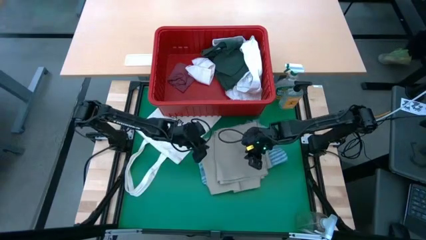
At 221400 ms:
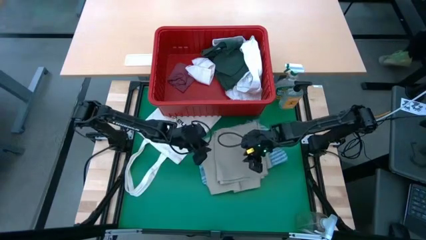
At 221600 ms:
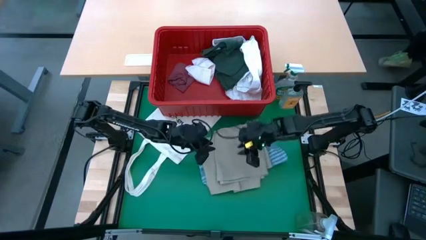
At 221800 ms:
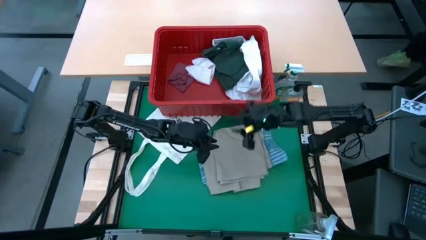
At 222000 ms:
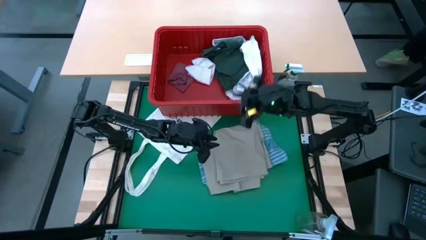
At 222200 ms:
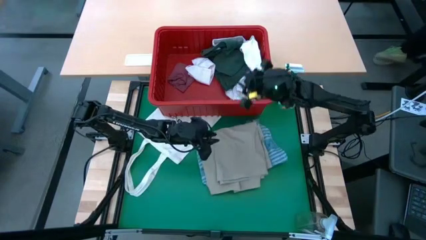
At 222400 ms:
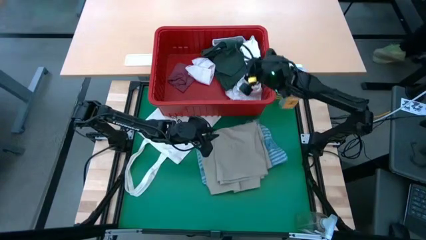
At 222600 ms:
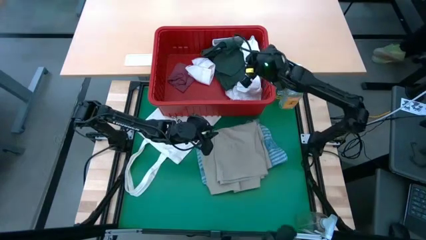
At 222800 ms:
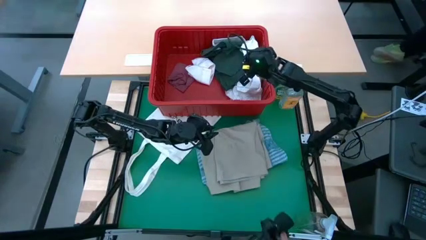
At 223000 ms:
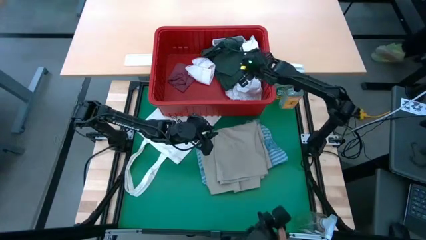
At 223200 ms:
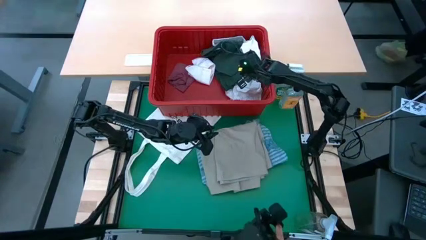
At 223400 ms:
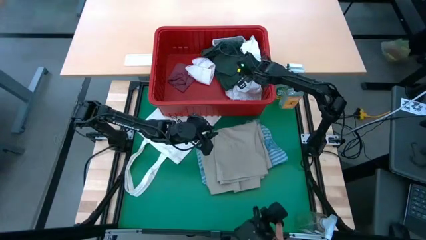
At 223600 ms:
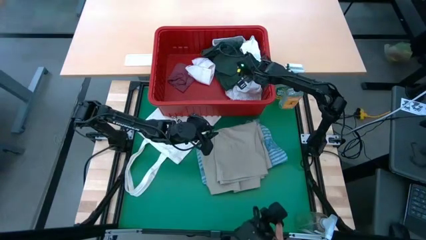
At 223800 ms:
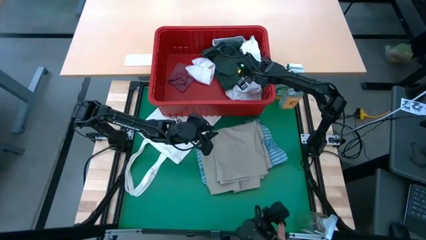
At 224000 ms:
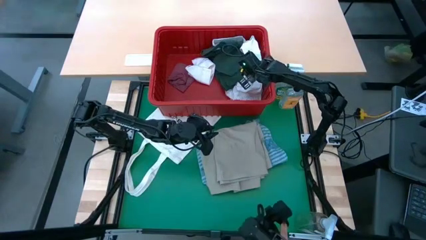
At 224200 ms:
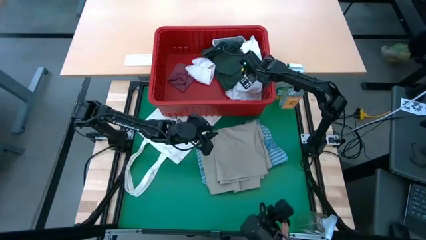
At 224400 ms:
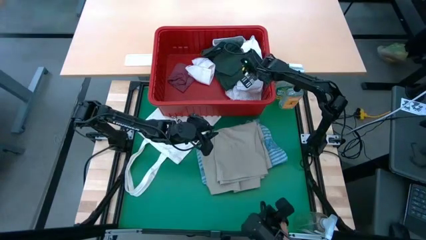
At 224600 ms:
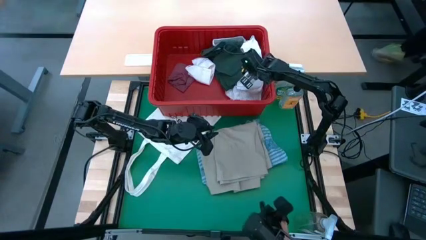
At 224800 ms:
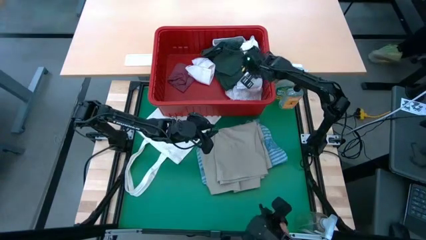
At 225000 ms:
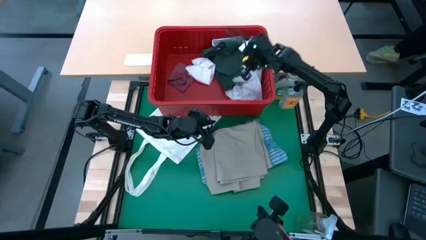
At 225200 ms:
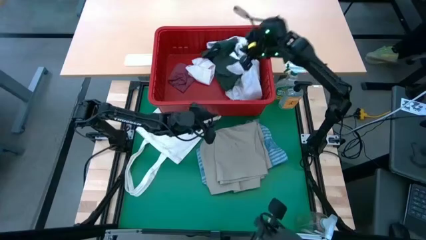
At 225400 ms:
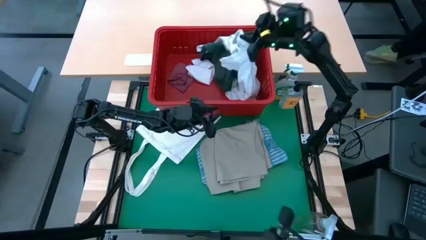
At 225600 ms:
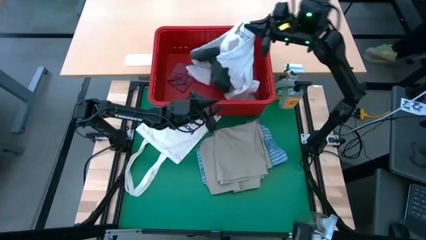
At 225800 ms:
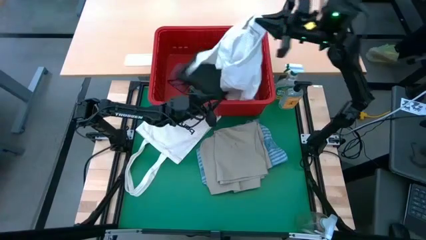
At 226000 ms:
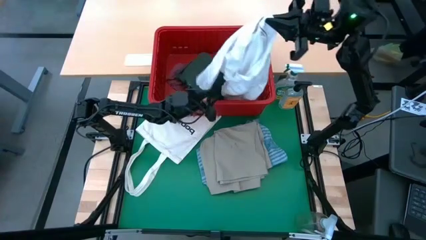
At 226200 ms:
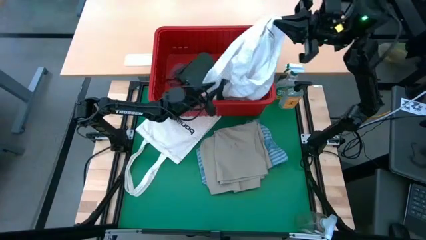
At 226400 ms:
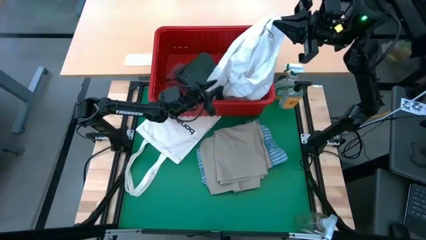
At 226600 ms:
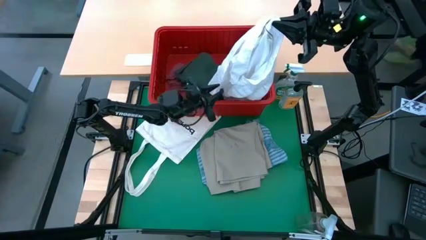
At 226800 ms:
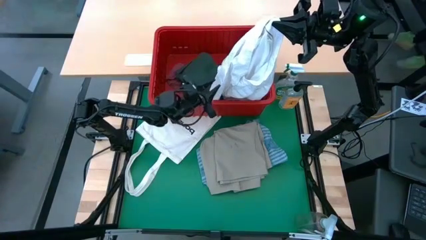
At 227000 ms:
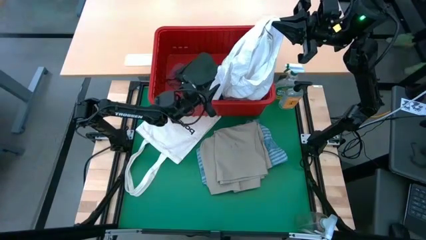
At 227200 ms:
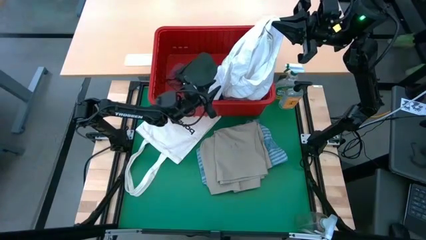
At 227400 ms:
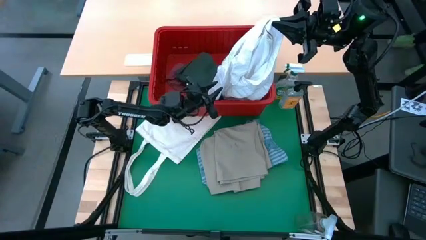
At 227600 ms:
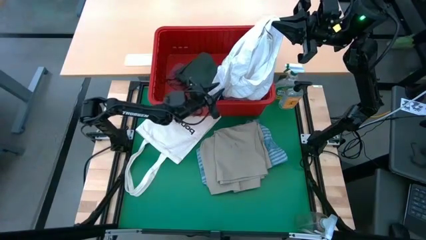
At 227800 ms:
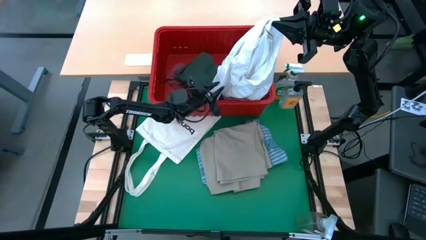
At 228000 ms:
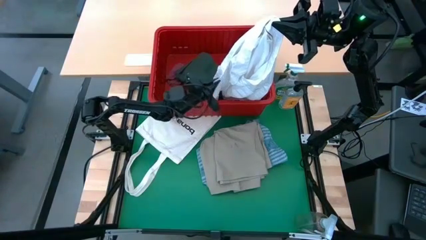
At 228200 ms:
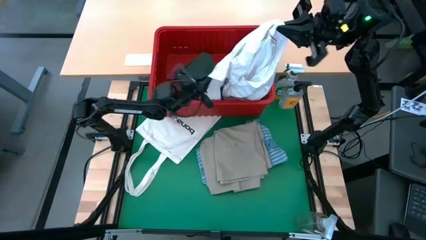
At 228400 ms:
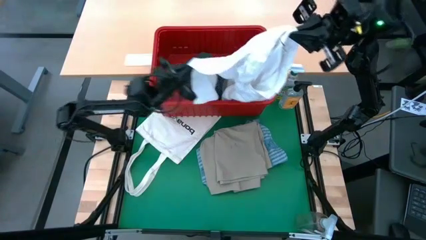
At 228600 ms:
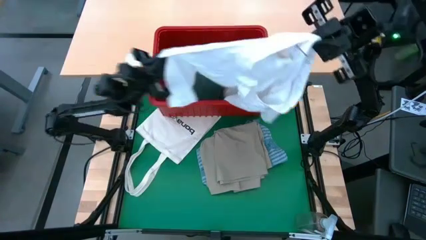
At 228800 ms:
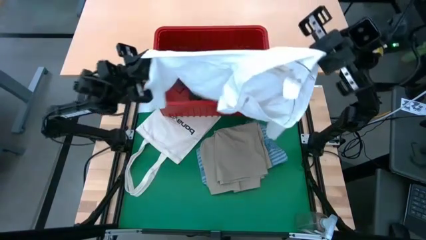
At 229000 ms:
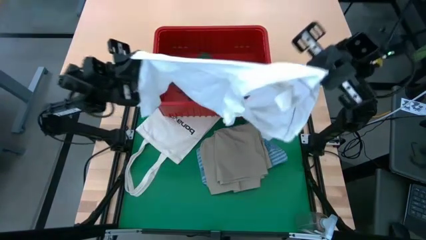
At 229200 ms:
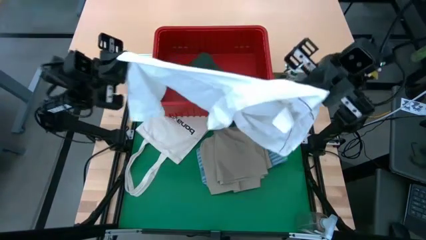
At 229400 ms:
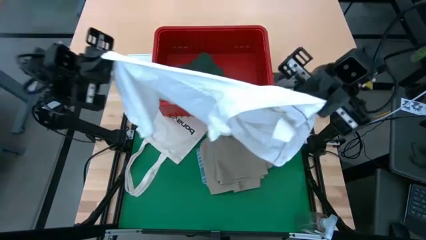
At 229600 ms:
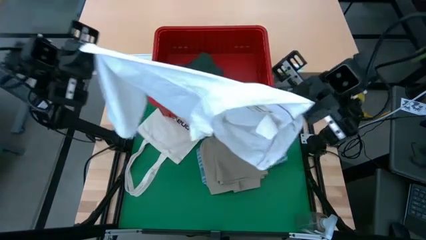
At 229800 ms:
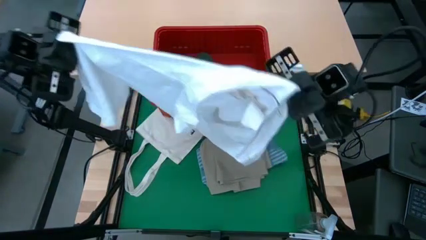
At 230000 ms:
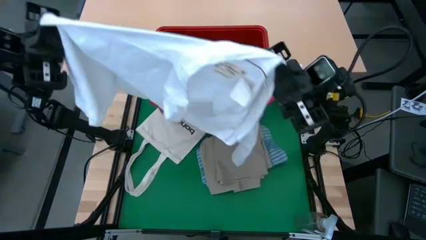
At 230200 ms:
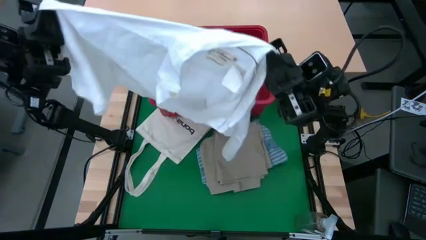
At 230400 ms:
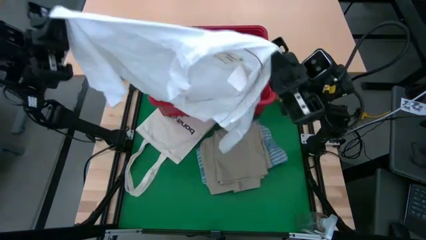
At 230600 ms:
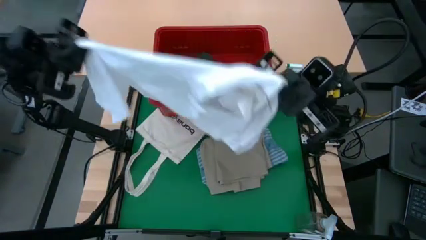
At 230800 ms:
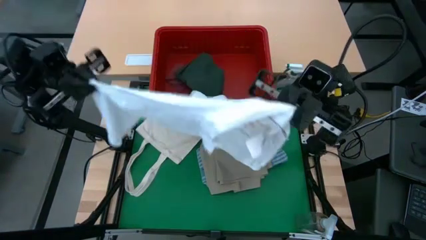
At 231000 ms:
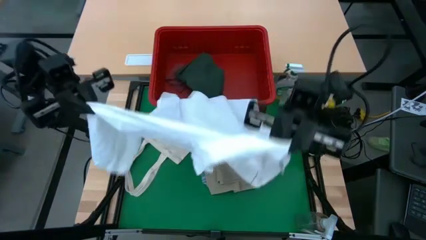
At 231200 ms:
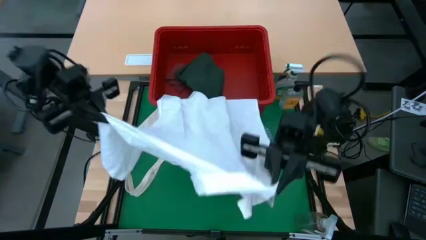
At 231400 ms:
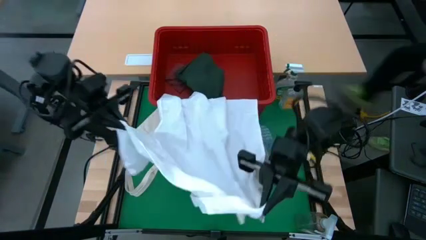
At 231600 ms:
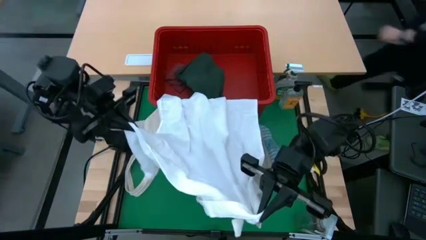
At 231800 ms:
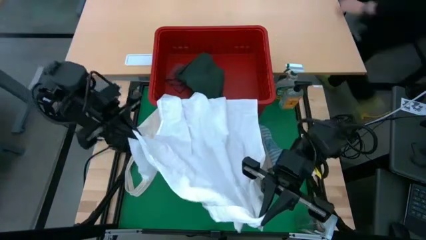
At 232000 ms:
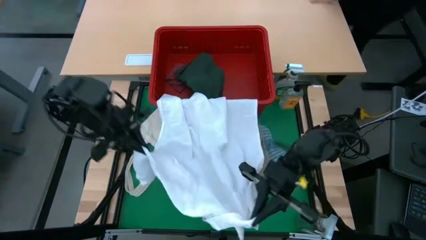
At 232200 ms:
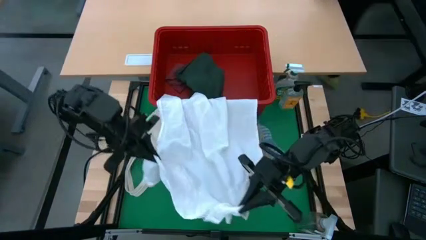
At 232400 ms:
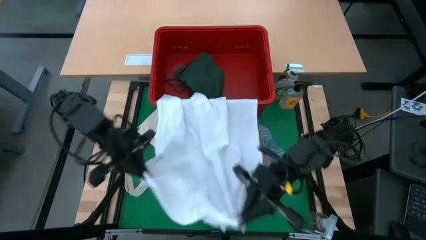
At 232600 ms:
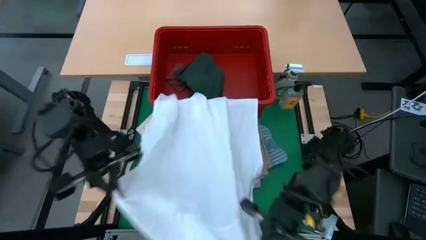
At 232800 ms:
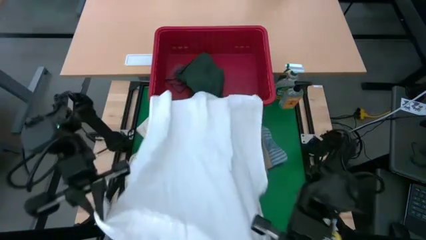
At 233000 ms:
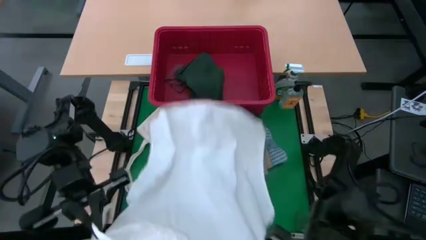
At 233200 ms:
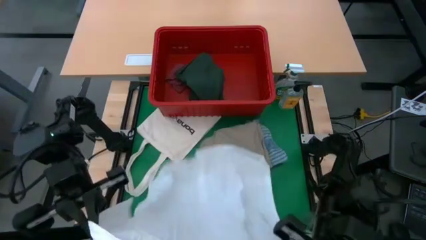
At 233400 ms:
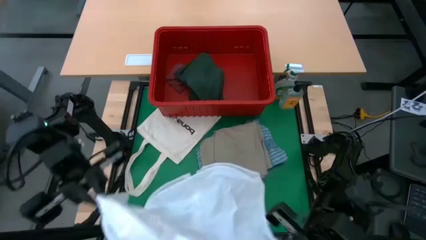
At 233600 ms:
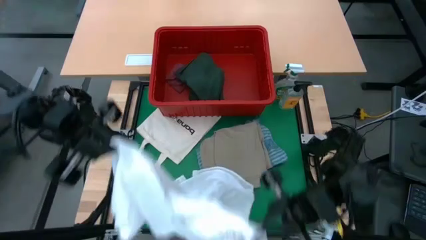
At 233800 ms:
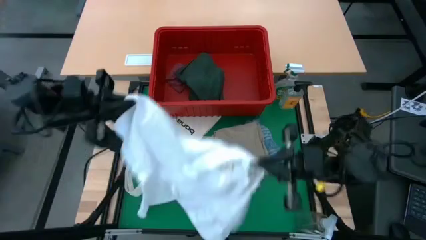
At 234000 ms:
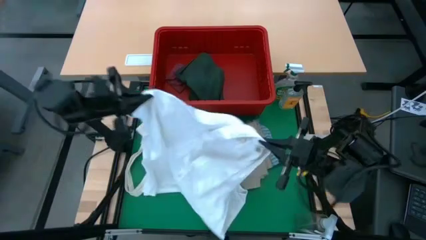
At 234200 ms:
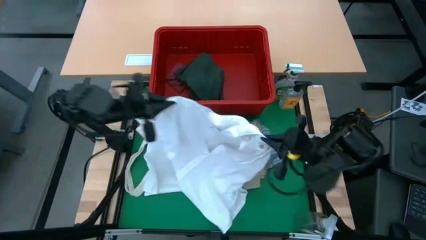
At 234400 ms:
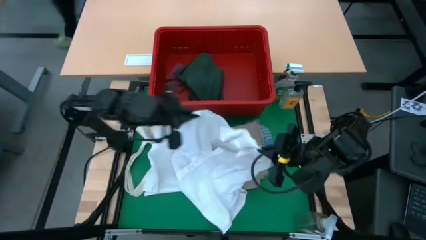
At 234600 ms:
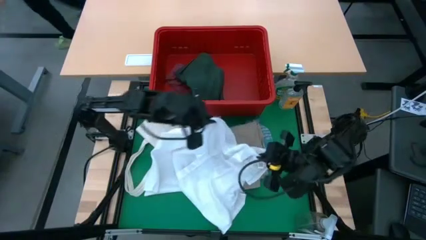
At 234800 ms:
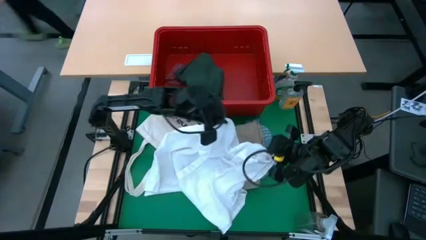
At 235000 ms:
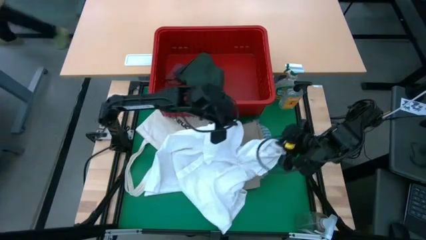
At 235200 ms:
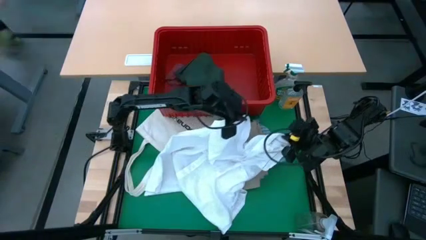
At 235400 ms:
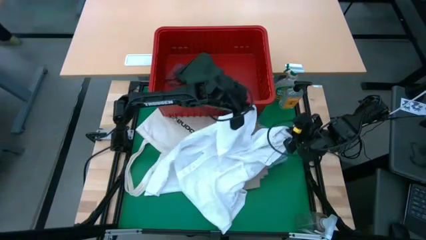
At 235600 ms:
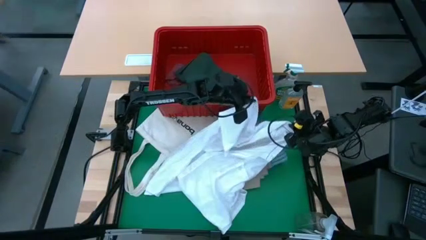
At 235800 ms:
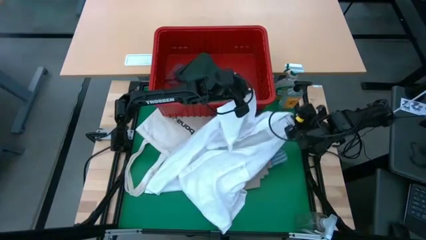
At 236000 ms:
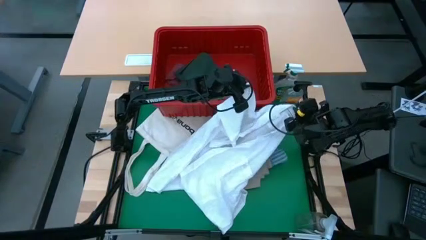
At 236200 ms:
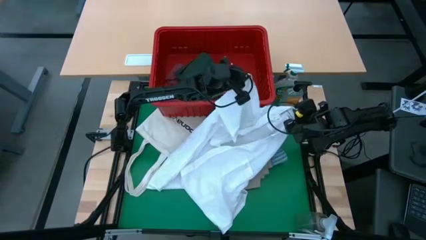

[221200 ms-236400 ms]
Task: Fold Laundry from Bin
Remove the white polo shirt from the red bin
